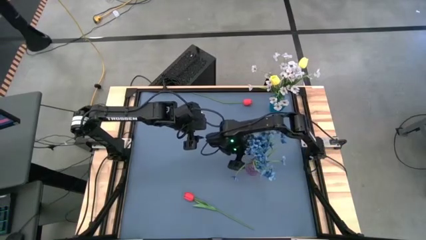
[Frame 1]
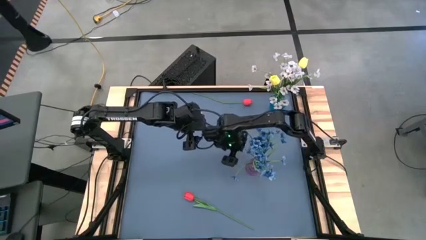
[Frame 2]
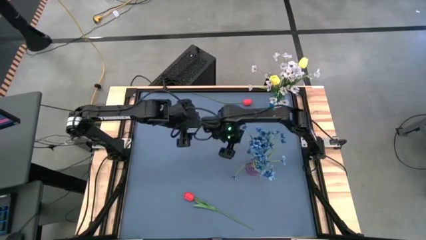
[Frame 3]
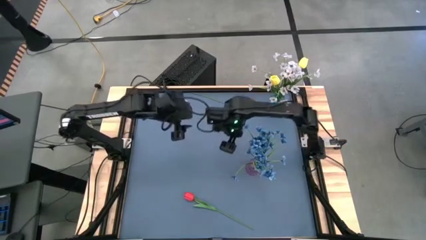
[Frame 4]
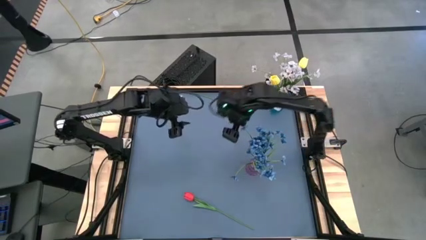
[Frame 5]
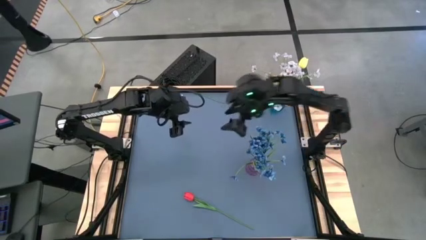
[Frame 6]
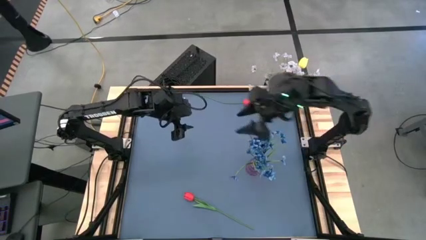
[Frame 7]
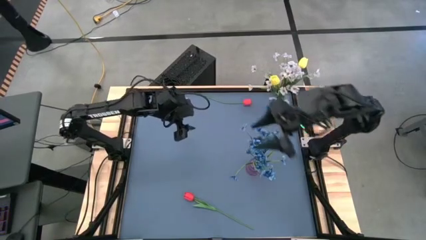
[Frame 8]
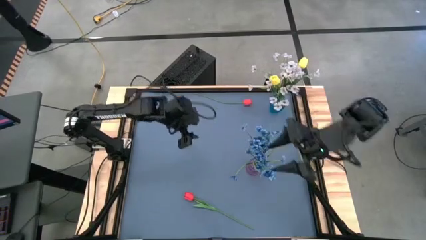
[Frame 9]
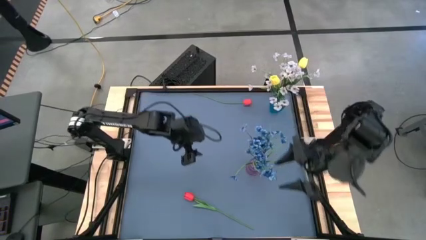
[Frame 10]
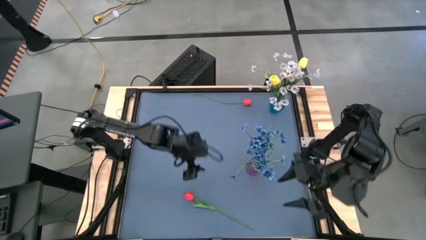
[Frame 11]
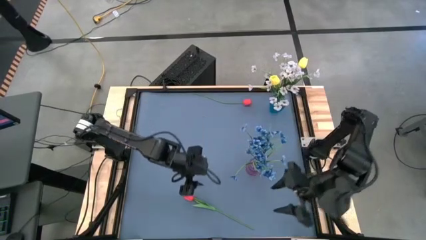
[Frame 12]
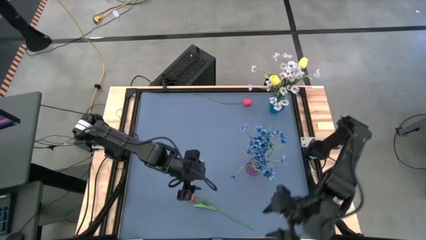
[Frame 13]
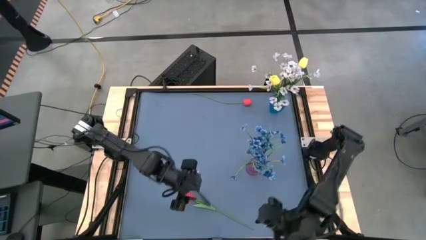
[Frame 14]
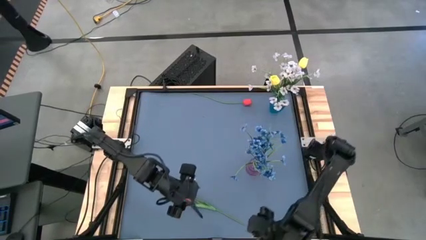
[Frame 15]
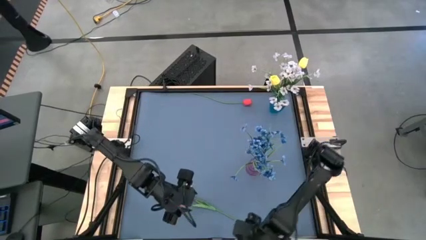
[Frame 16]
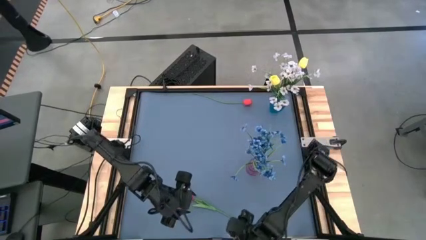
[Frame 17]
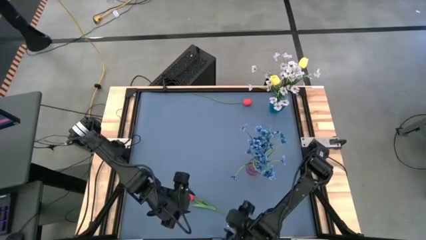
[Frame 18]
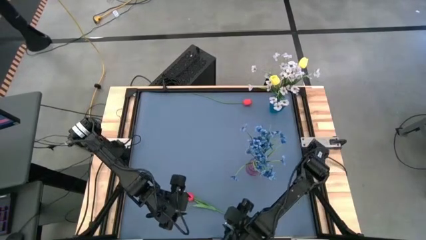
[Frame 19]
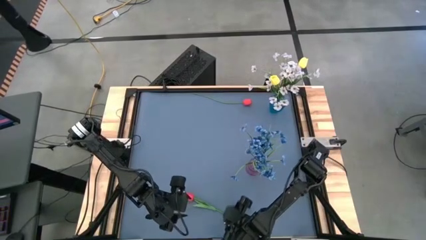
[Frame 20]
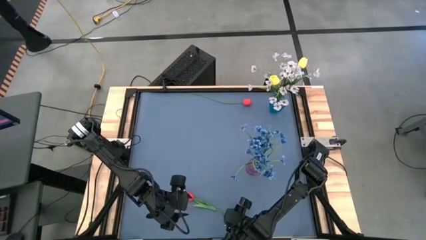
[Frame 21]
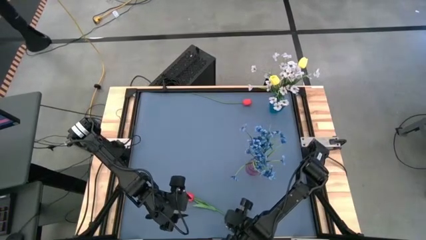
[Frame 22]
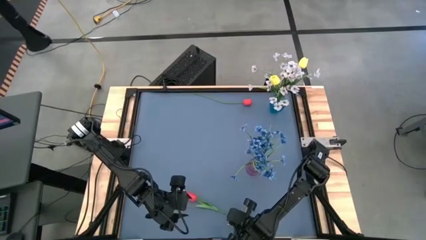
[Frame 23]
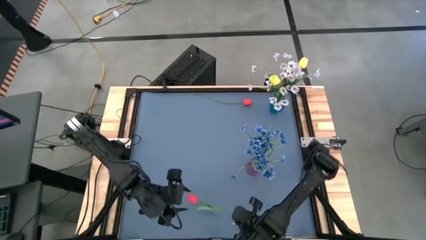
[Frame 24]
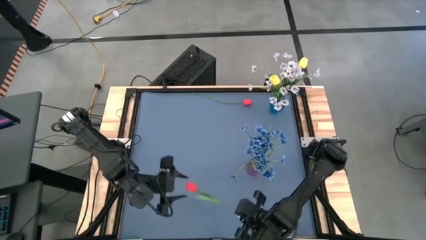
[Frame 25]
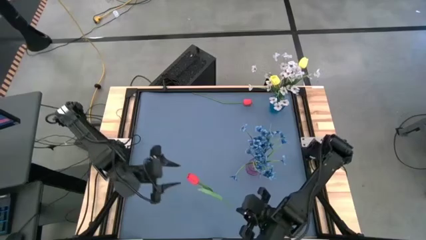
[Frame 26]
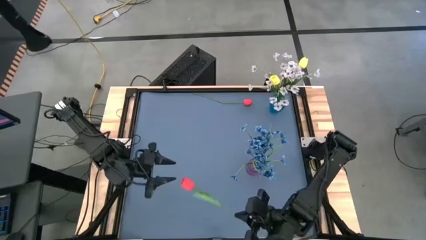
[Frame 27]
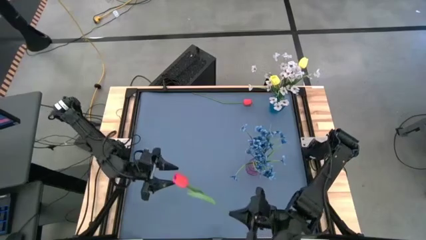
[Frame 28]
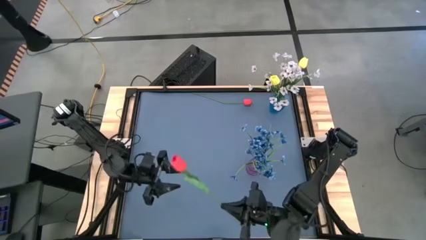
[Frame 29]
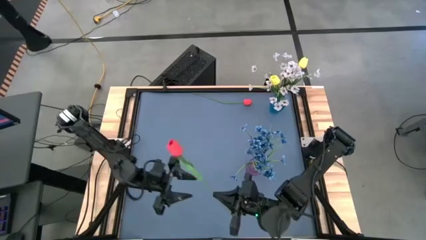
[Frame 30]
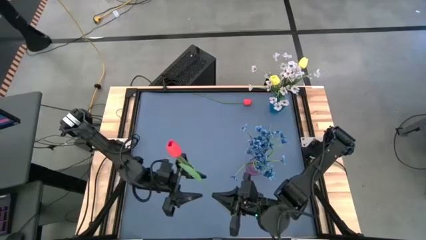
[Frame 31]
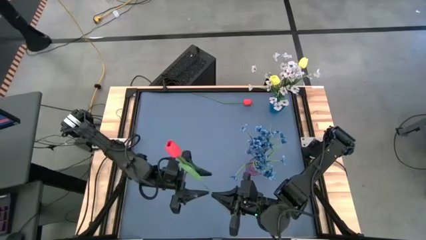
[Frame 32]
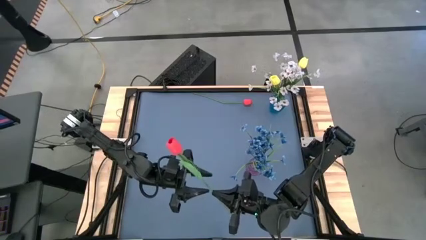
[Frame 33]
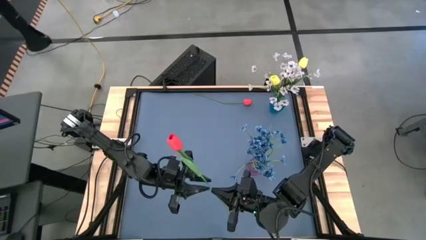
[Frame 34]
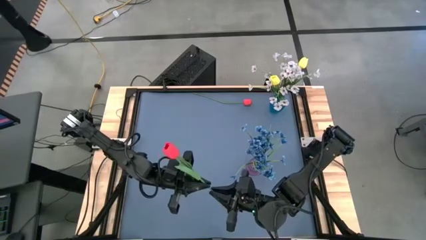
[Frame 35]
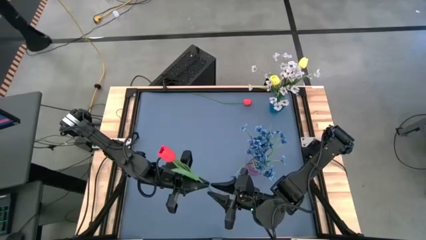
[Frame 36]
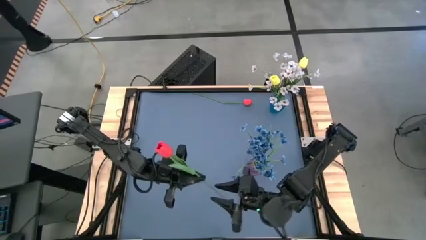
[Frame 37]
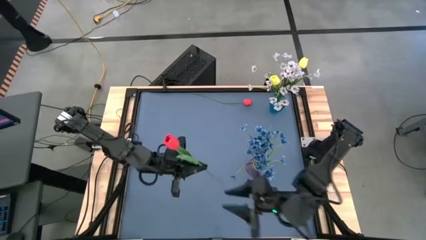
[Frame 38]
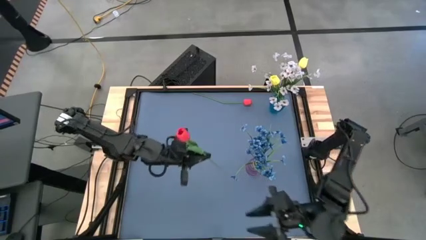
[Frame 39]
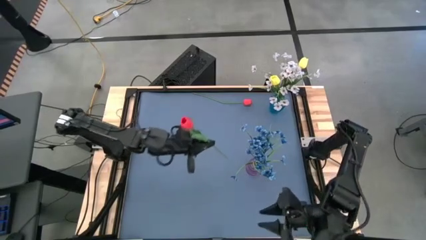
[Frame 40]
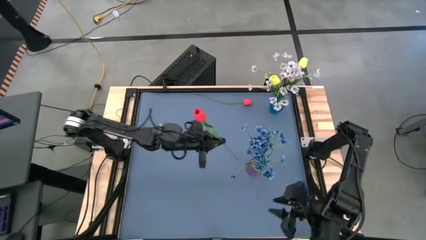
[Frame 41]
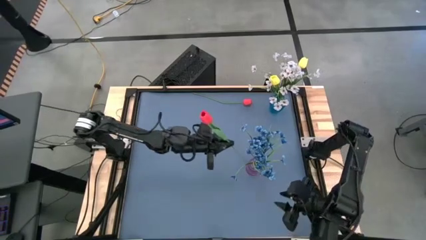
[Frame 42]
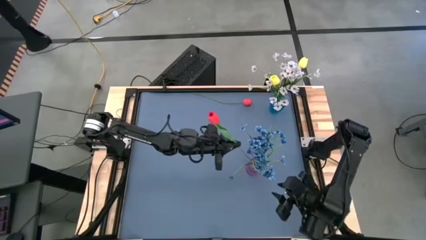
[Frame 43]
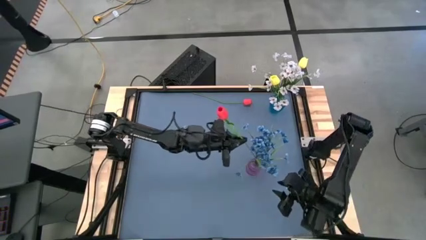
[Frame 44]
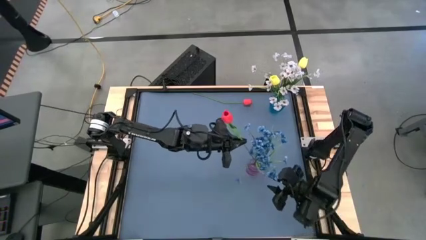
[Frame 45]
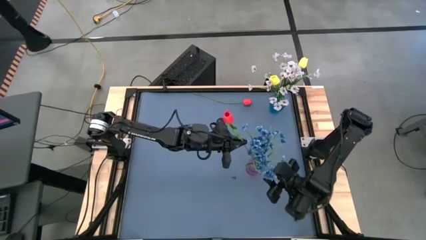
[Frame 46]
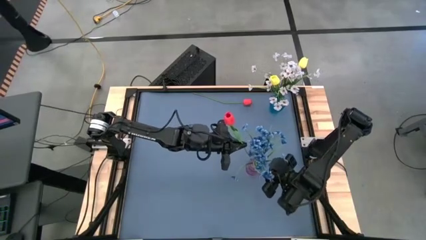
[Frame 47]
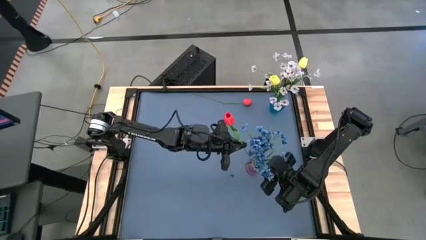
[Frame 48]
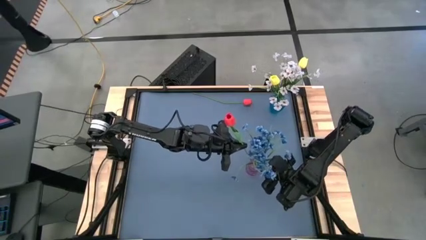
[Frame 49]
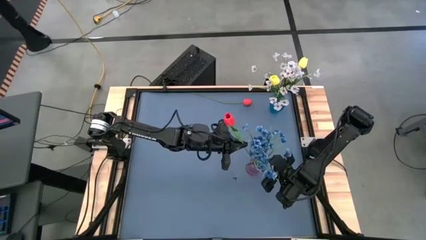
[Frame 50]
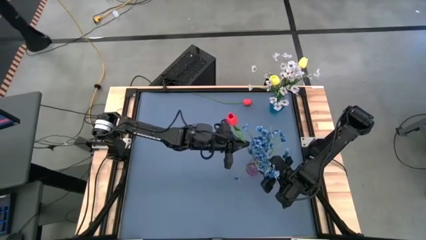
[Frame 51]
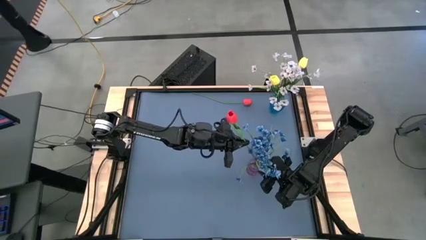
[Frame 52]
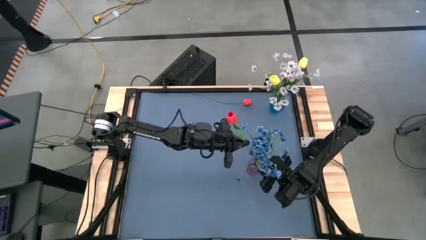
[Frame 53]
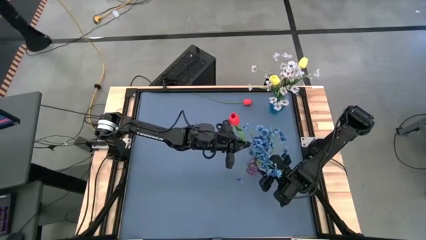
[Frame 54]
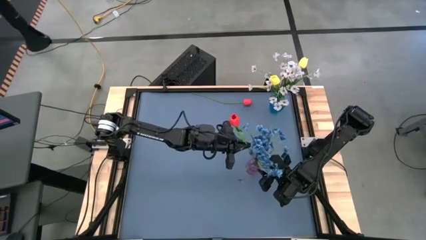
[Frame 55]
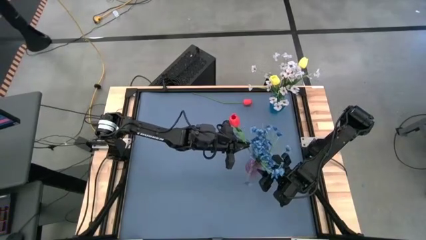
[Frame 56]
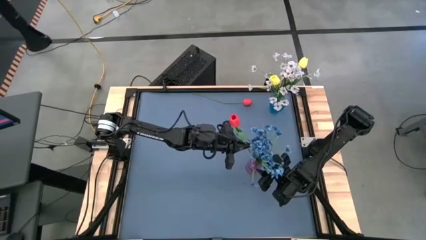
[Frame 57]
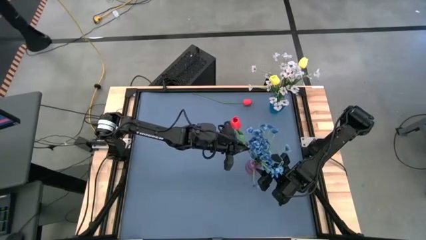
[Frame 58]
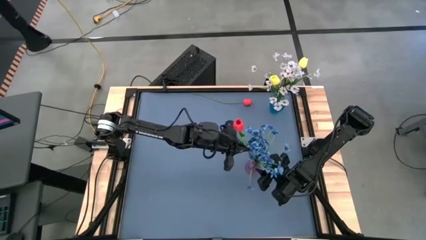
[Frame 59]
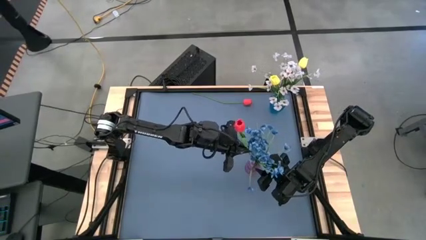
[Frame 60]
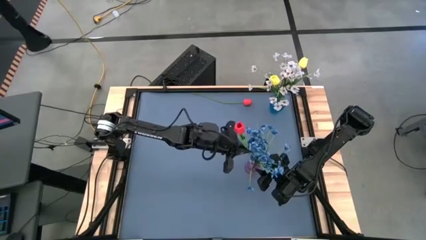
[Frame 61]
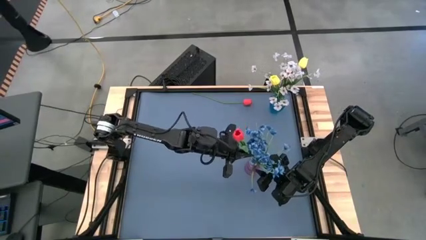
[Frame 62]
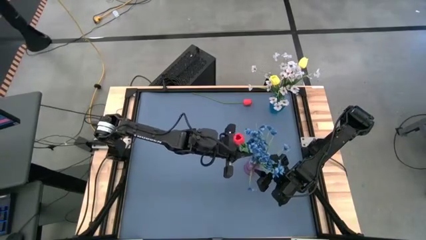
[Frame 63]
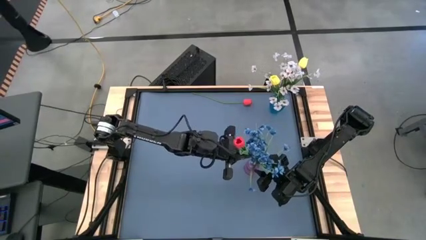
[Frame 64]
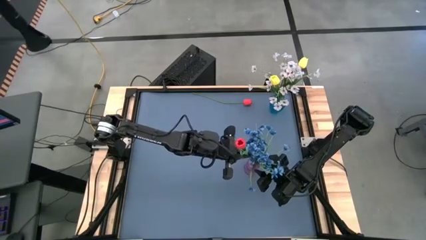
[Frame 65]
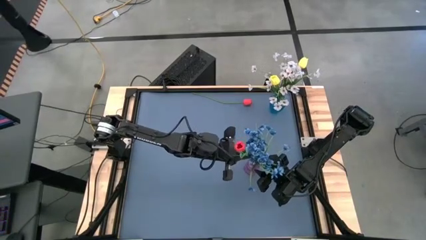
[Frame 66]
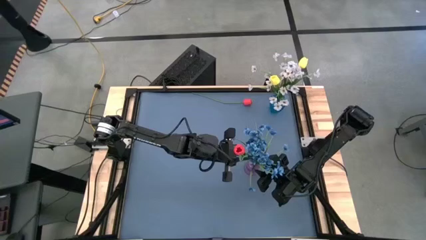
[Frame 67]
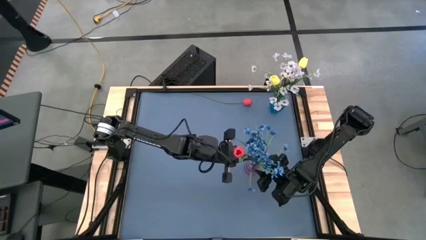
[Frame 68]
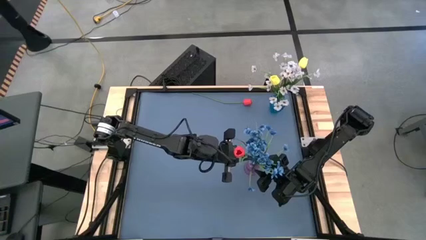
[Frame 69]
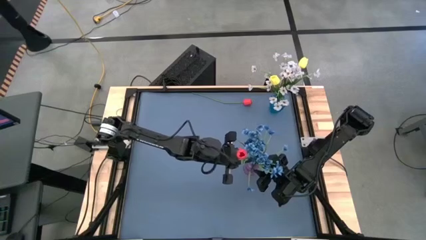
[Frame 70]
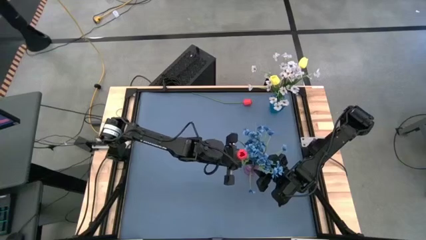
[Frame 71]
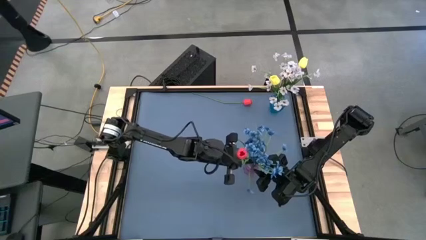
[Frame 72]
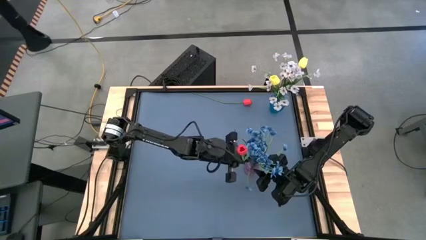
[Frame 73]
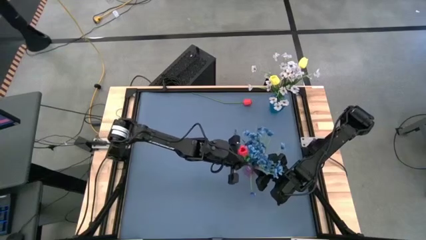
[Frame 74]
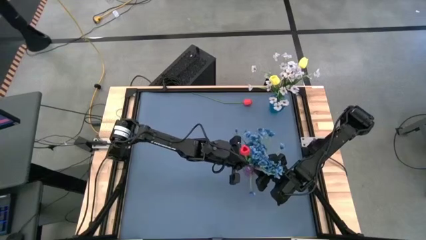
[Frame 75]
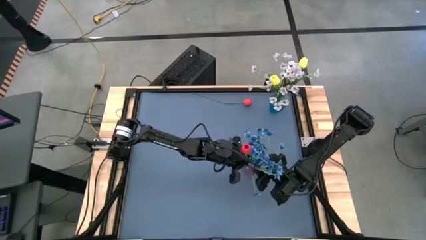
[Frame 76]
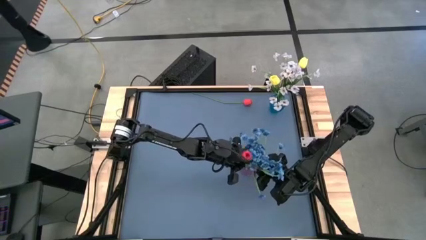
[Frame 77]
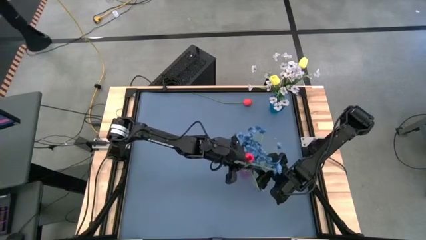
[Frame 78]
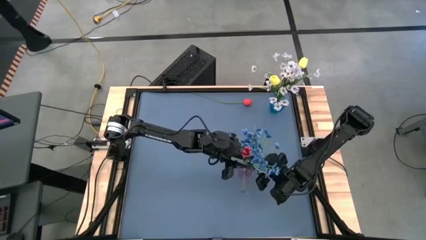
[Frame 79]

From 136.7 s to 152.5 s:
Task: Sort flowers into vase by color
Put the bottom red flower into the violet vase
